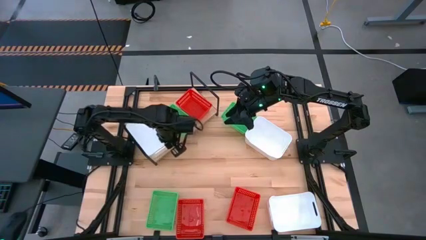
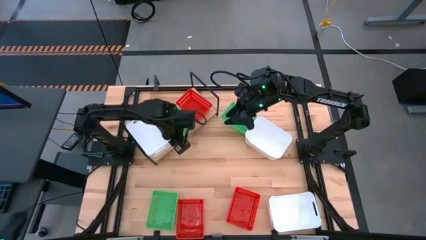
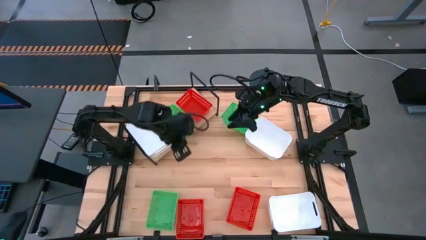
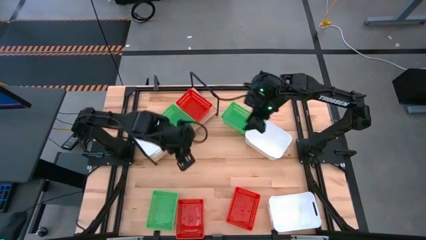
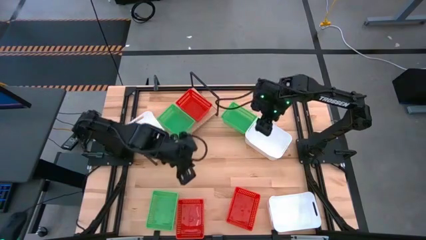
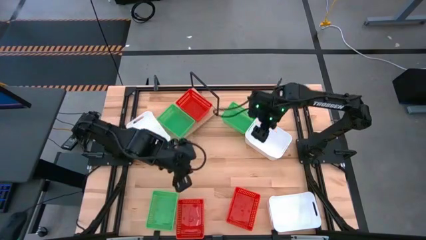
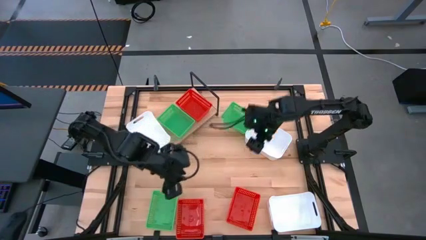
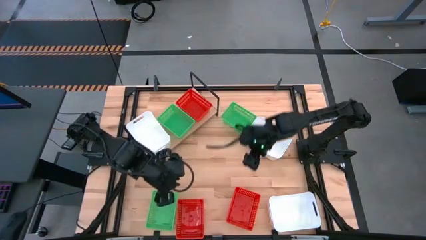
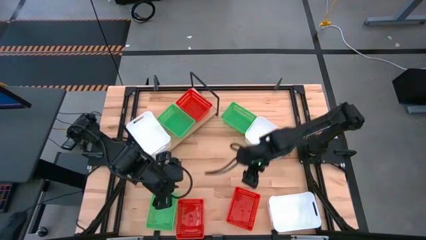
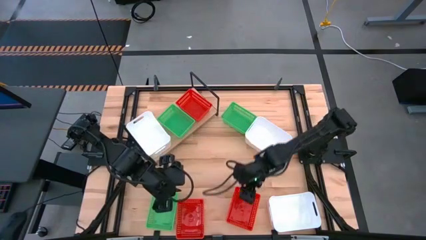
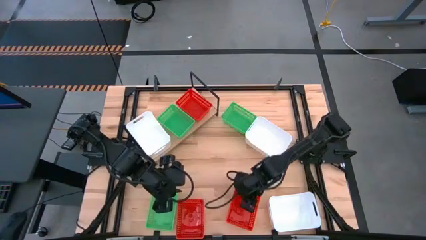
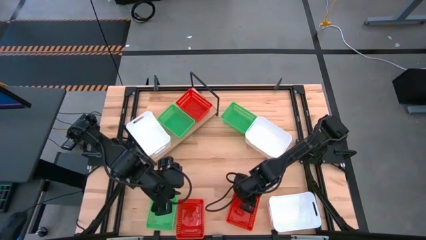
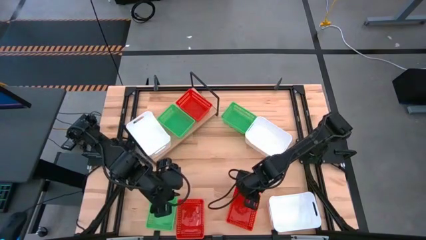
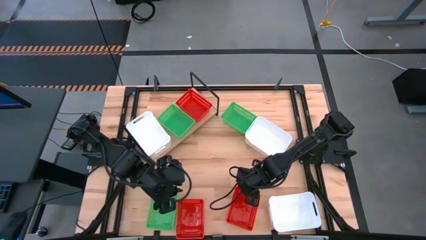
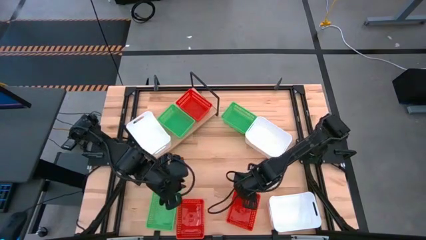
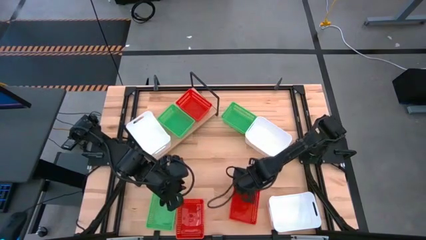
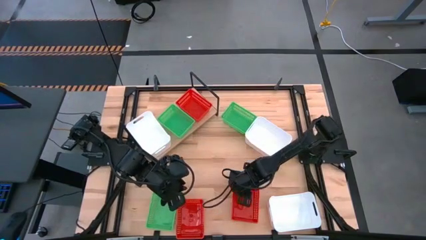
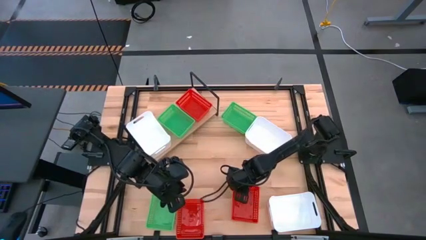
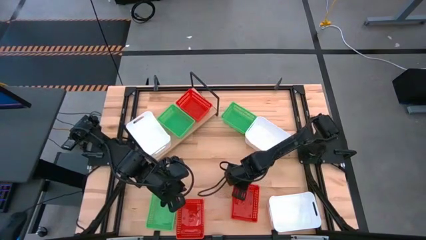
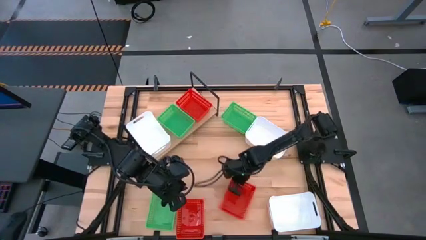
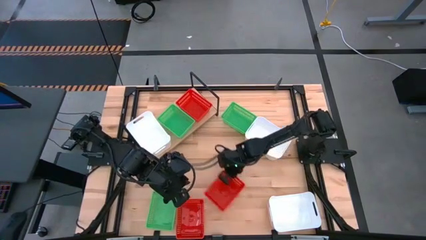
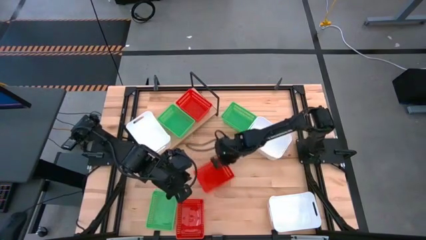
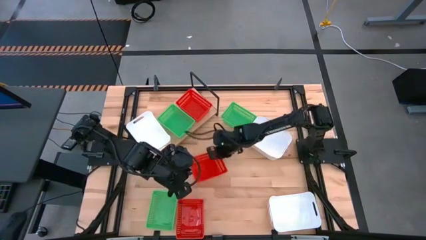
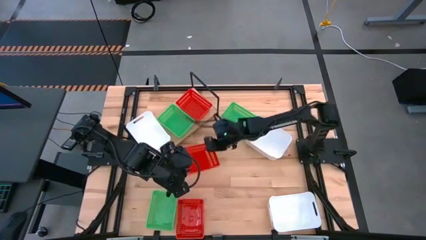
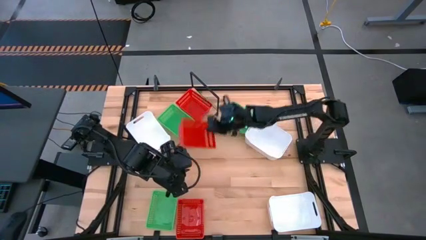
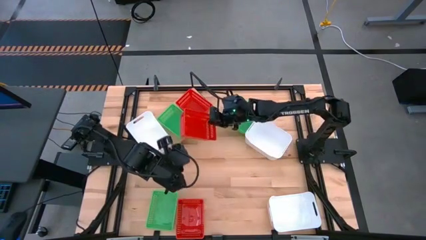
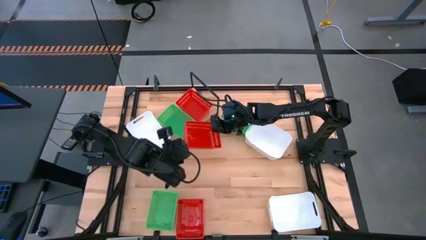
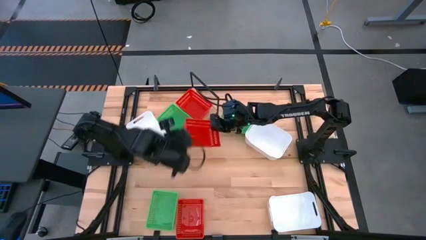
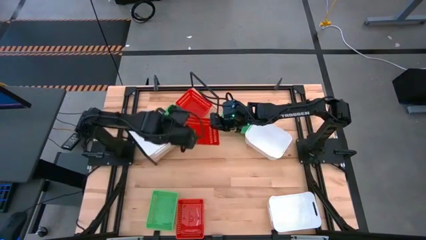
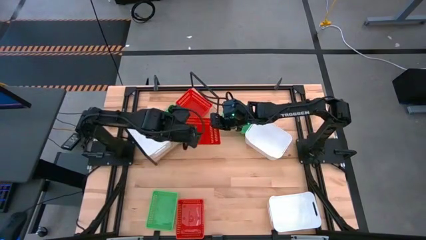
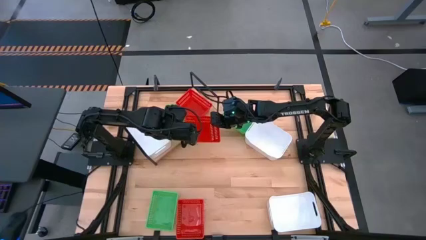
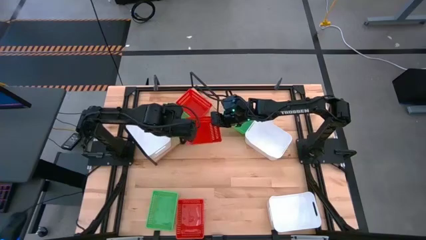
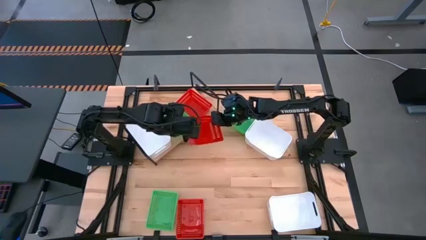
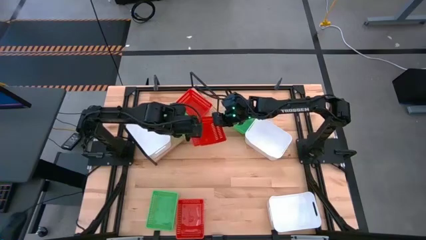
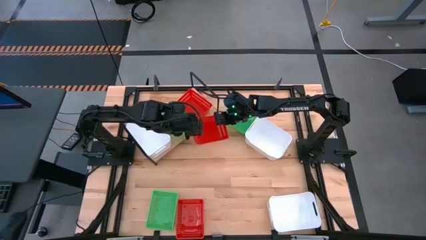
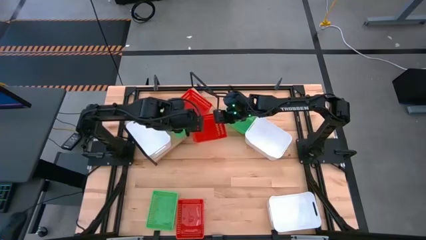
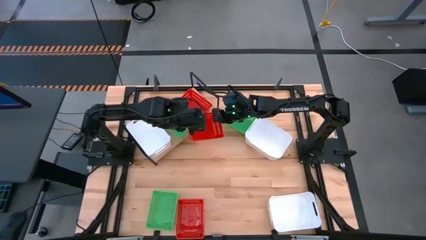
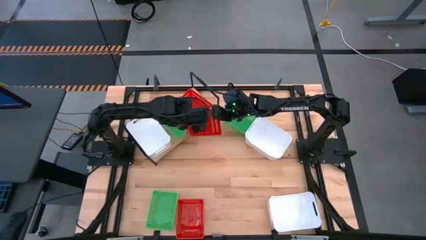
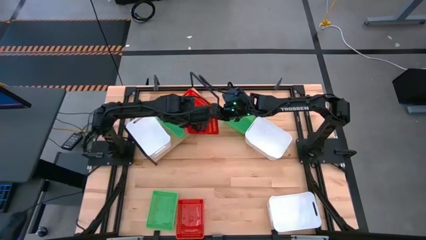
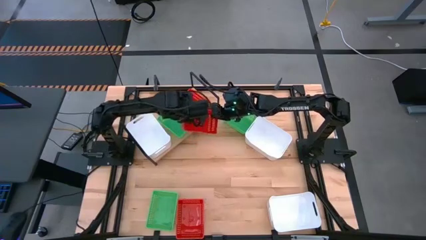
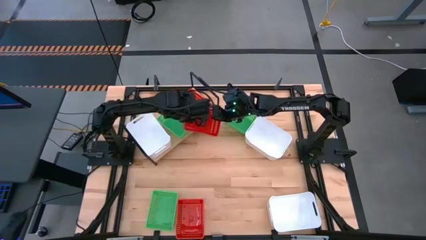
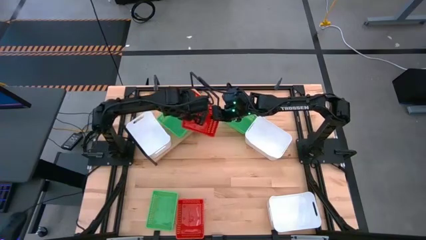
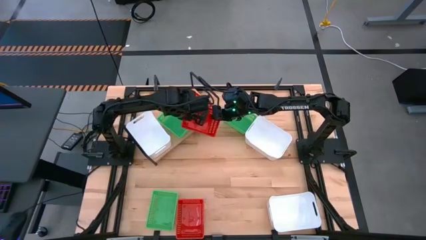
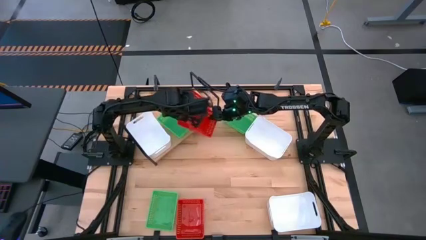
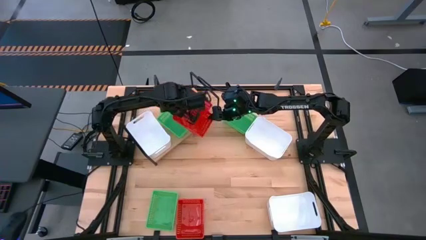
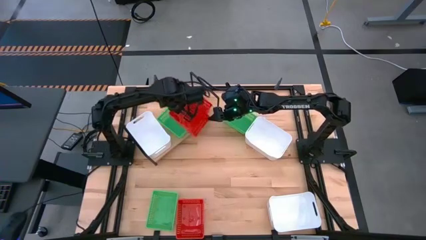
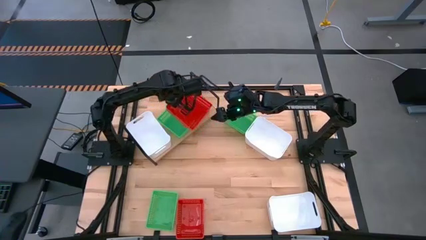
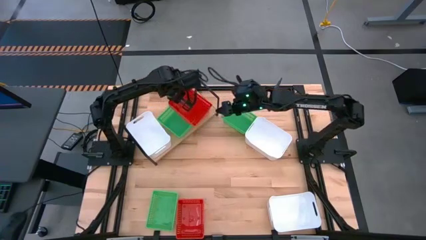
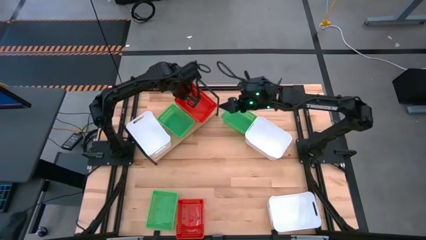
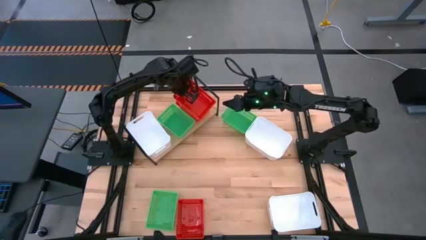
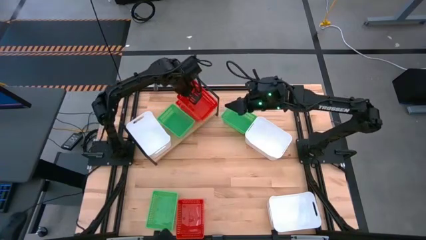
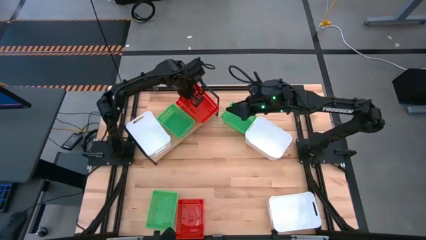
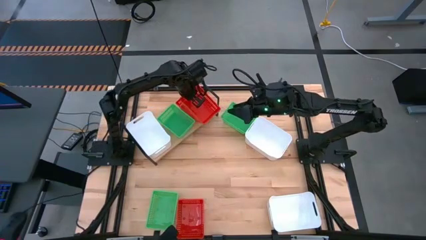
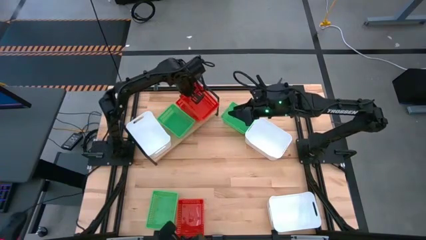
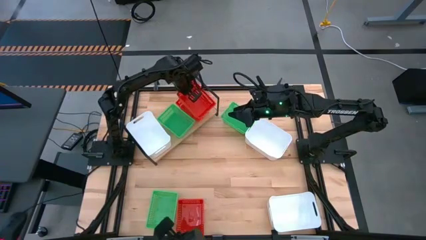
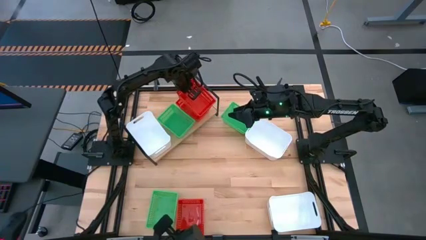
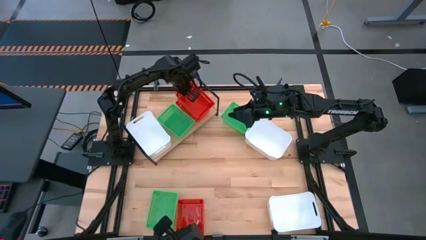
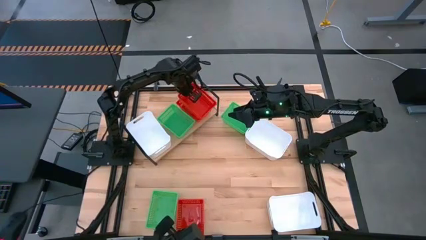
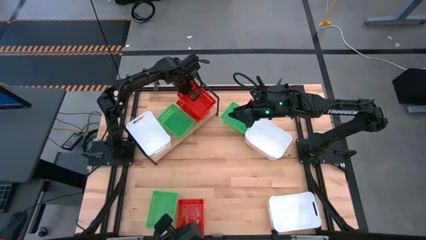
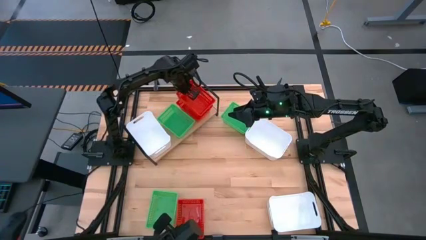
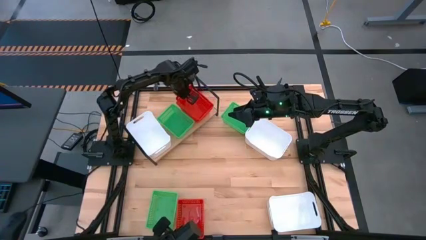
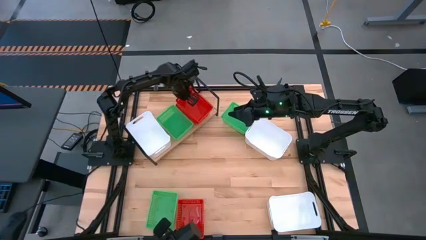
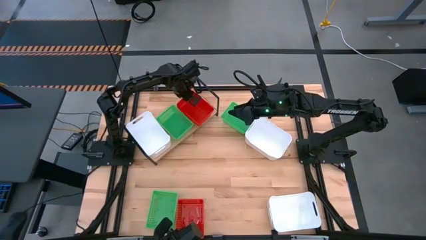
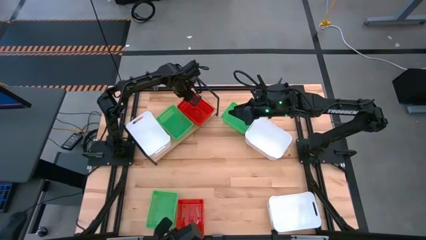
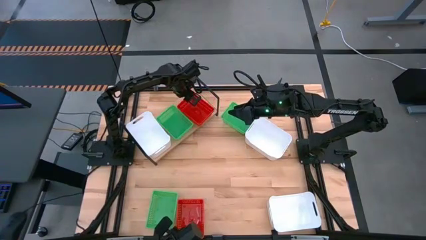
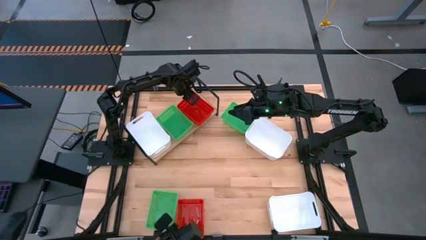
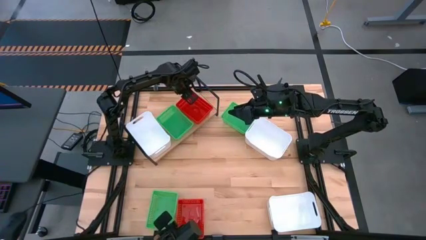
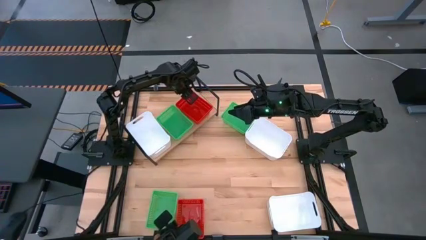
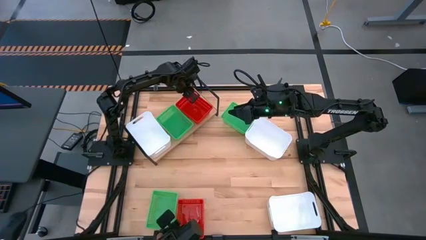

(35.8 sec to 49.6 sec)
Task: Stack baskets on shelf by color
Stack the right red on top of the red bin on the shelf

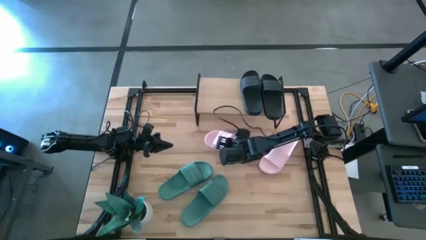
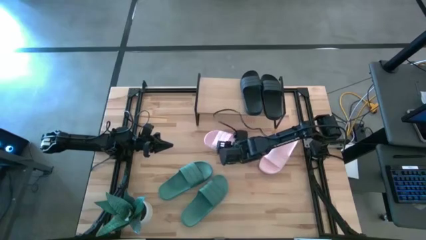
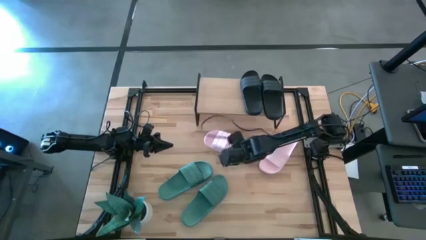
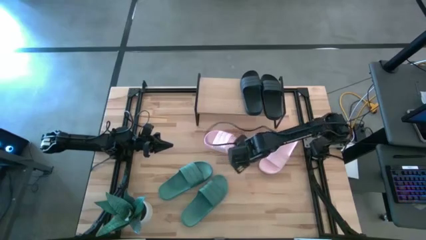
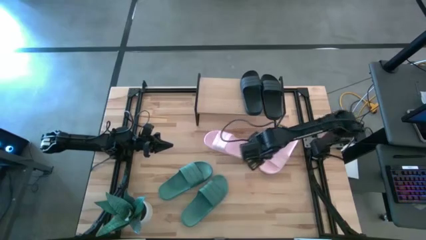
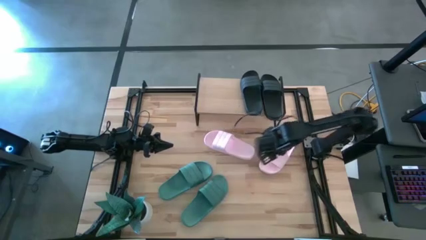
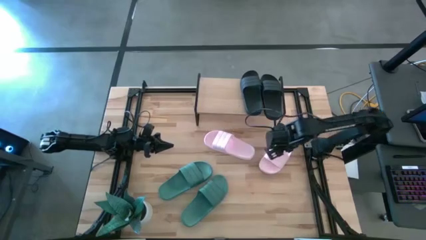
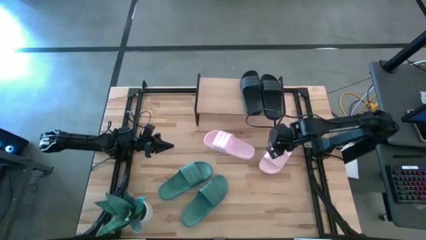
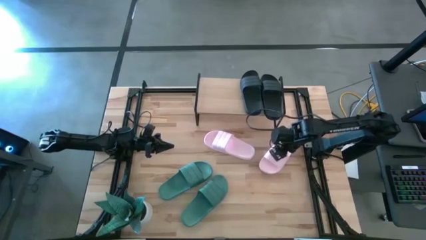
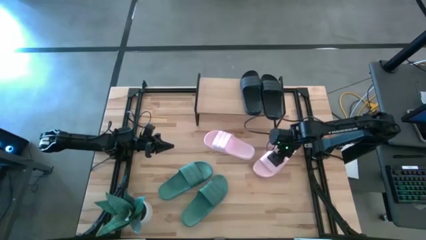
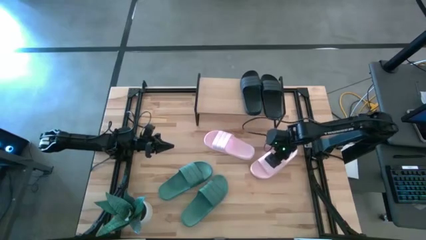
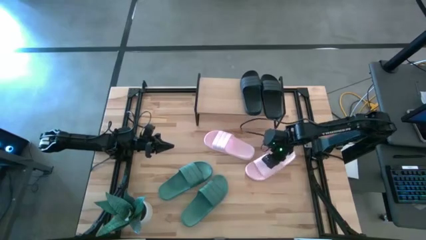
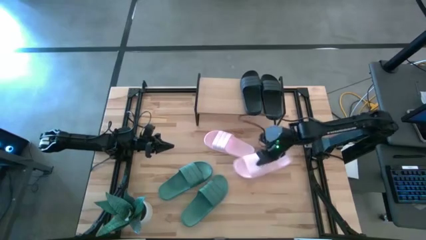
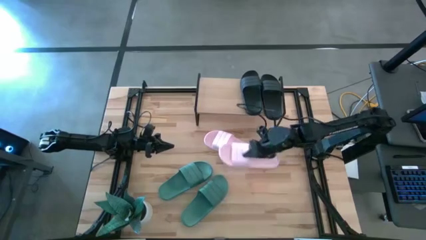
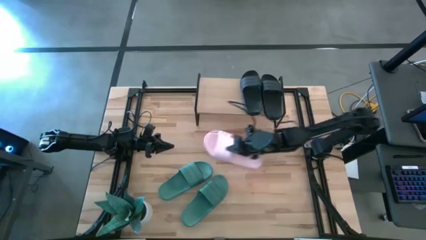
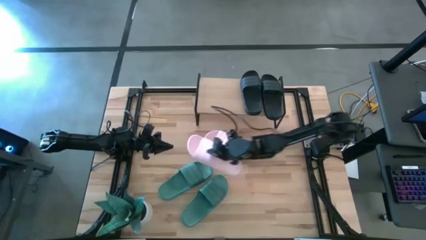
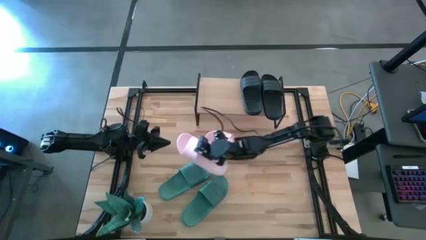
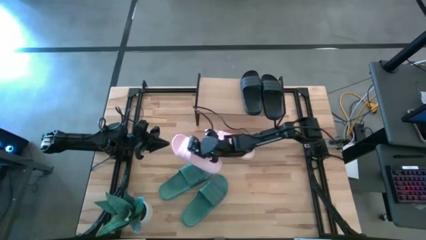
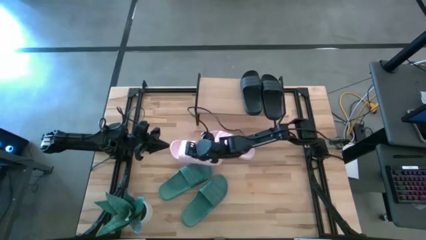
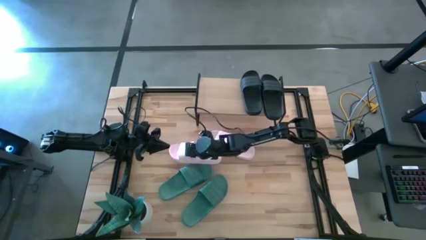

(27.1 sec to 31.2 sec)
Task: Pick and place slides into the shelf
Move the right pink slipper to the bottom of the other pink slipper
